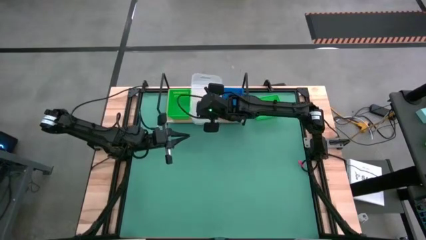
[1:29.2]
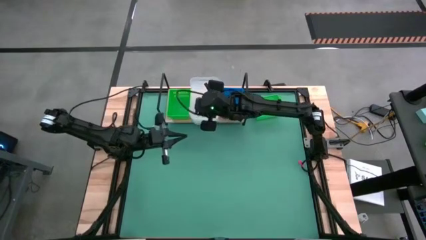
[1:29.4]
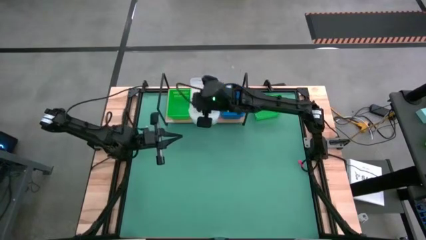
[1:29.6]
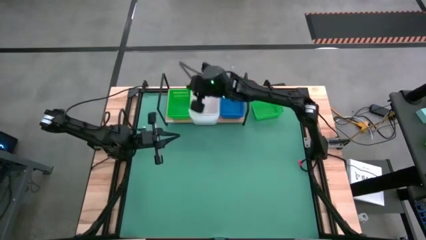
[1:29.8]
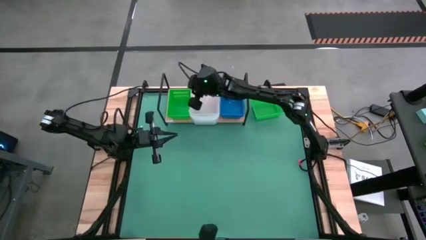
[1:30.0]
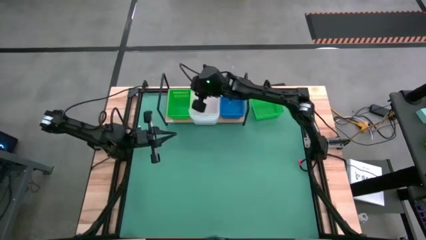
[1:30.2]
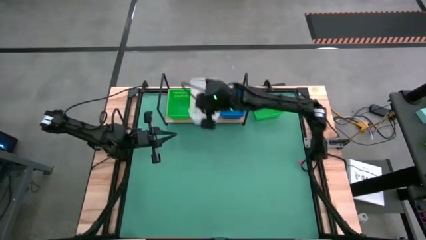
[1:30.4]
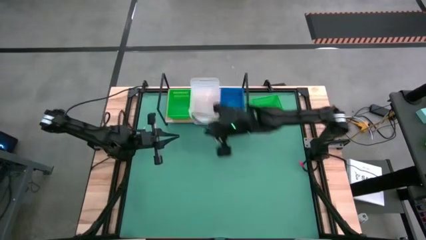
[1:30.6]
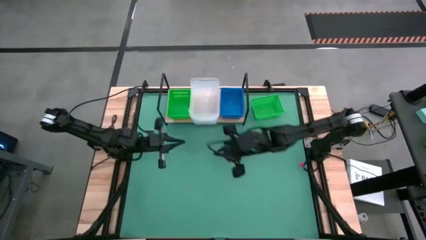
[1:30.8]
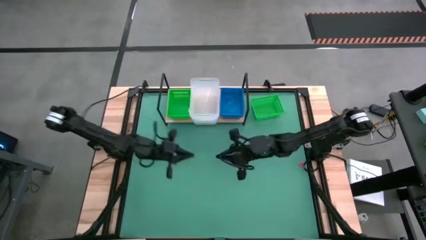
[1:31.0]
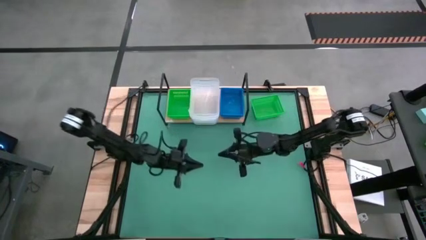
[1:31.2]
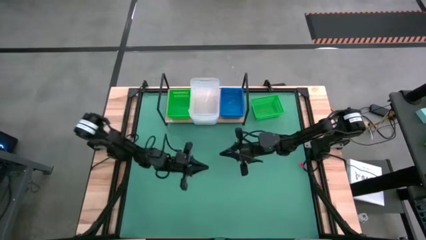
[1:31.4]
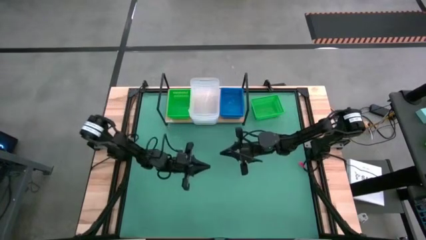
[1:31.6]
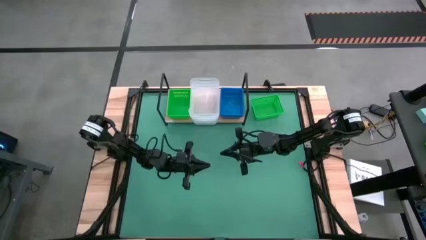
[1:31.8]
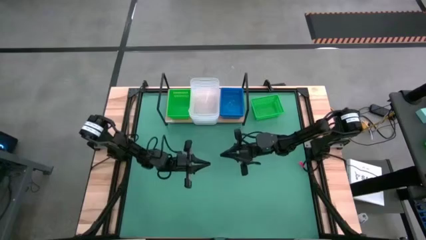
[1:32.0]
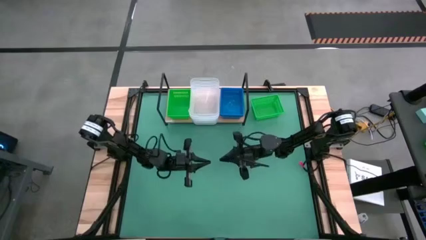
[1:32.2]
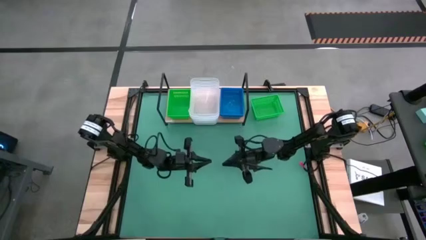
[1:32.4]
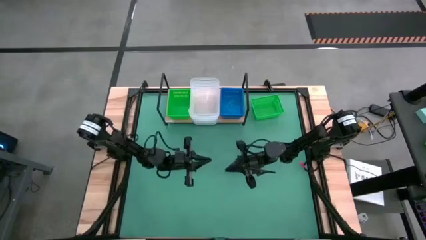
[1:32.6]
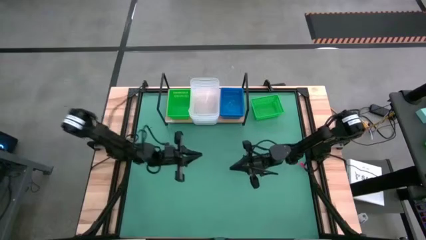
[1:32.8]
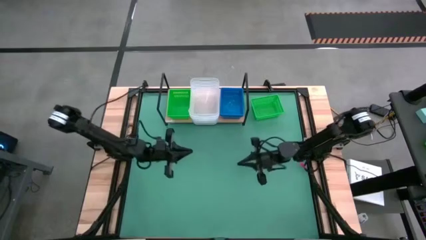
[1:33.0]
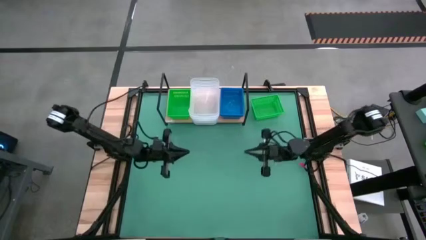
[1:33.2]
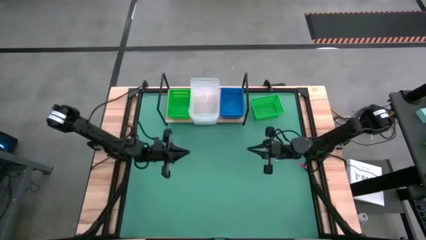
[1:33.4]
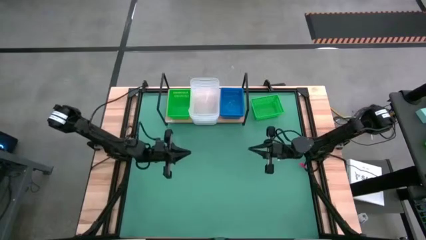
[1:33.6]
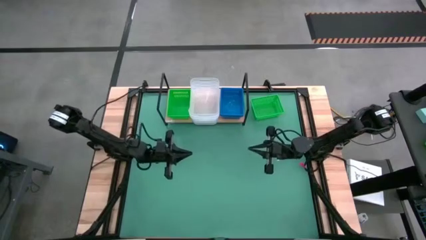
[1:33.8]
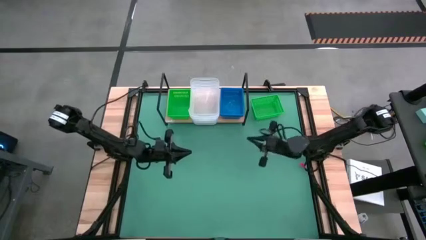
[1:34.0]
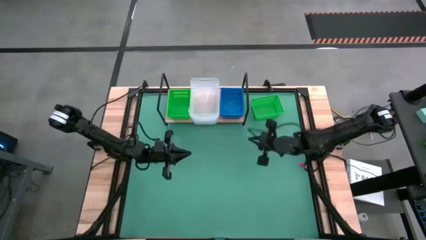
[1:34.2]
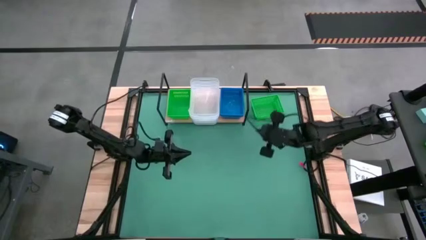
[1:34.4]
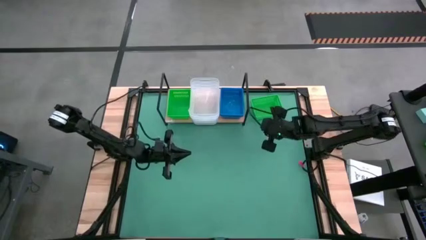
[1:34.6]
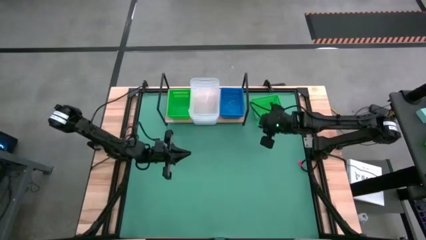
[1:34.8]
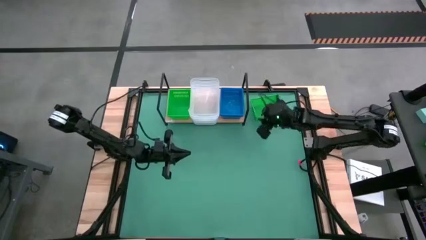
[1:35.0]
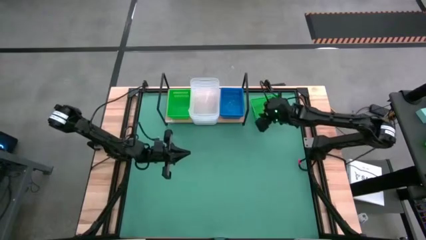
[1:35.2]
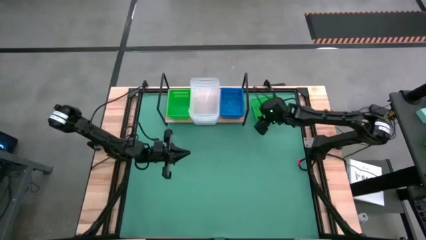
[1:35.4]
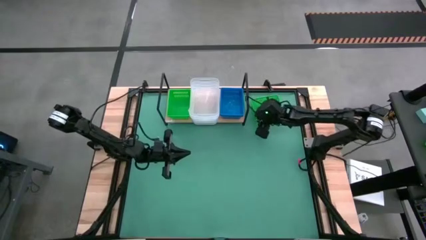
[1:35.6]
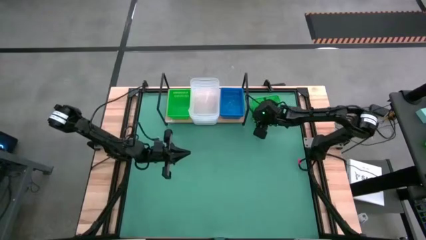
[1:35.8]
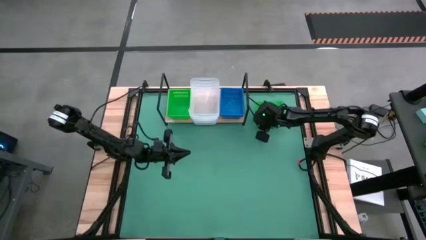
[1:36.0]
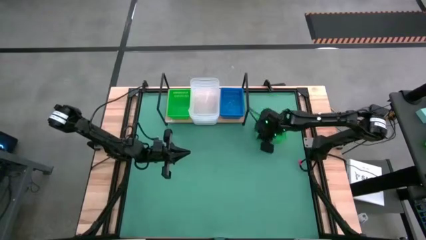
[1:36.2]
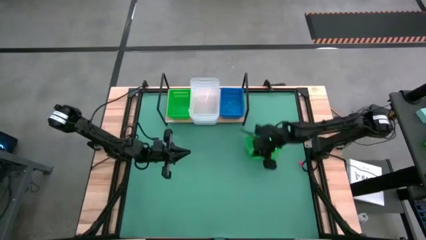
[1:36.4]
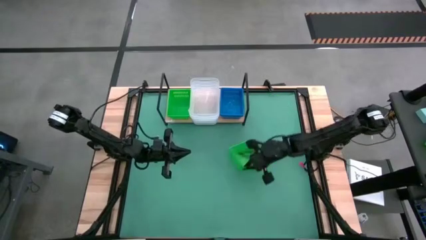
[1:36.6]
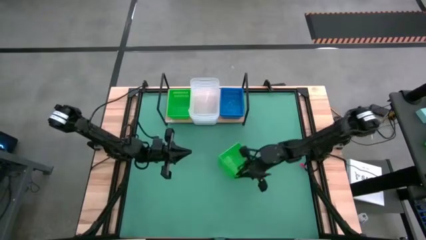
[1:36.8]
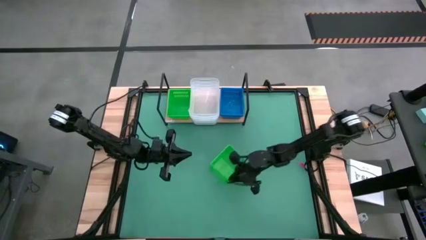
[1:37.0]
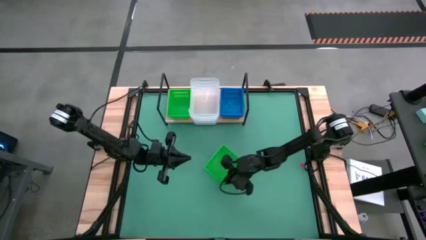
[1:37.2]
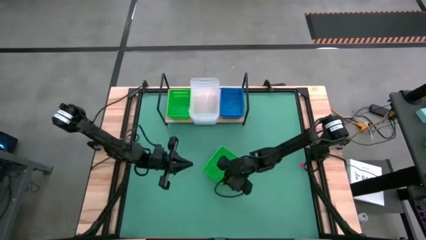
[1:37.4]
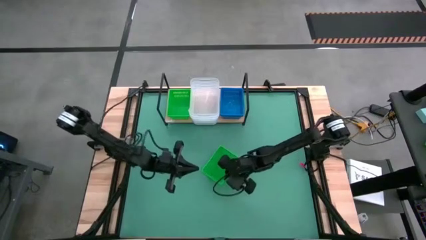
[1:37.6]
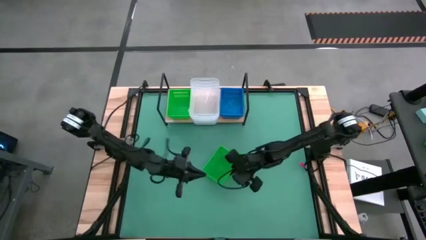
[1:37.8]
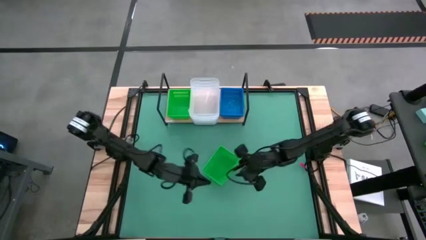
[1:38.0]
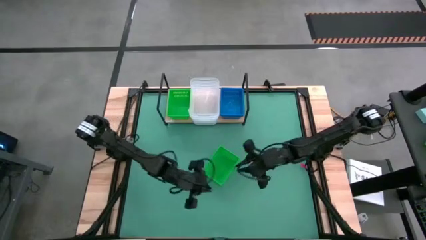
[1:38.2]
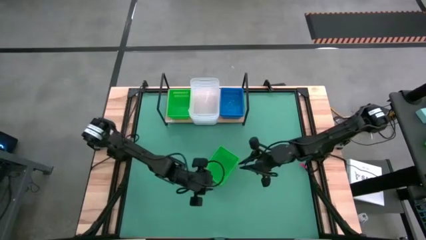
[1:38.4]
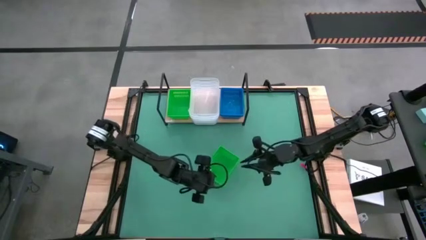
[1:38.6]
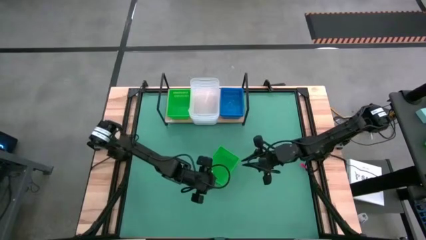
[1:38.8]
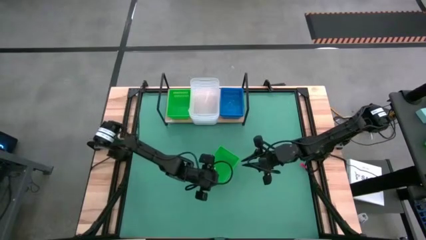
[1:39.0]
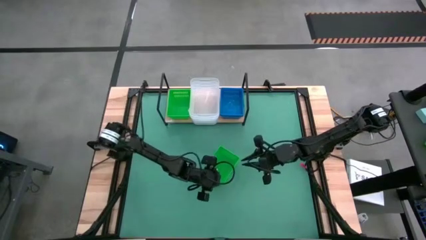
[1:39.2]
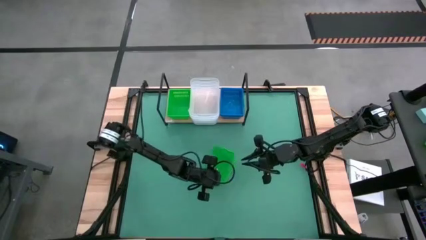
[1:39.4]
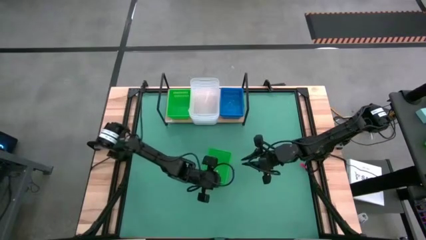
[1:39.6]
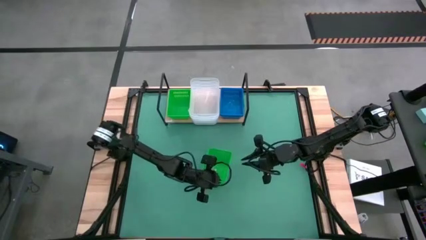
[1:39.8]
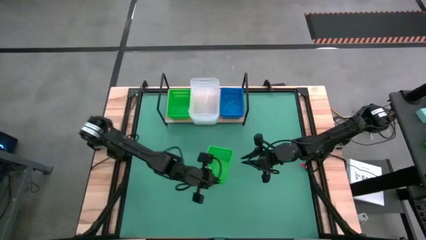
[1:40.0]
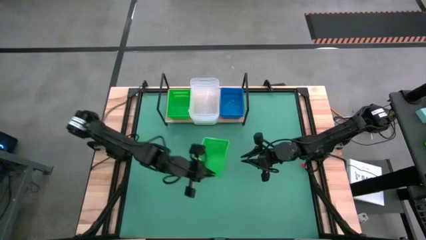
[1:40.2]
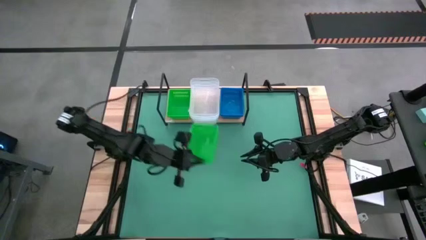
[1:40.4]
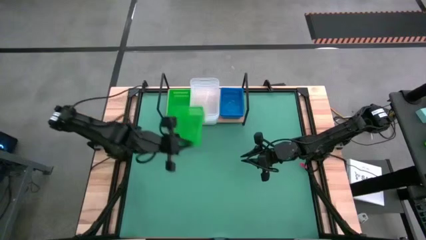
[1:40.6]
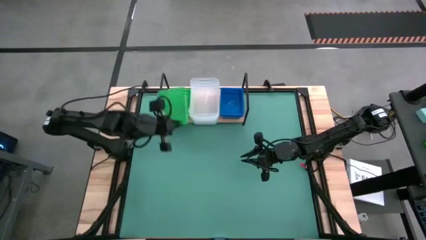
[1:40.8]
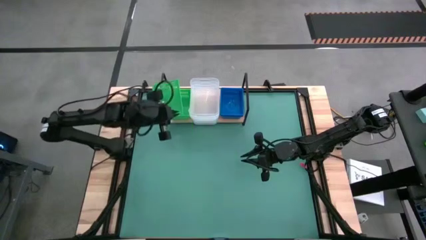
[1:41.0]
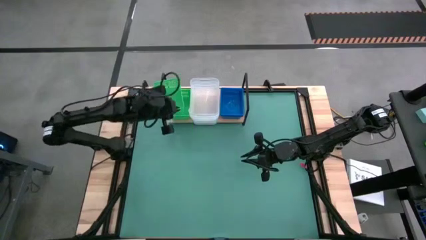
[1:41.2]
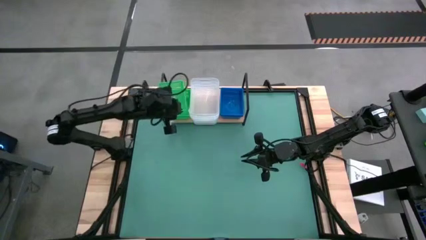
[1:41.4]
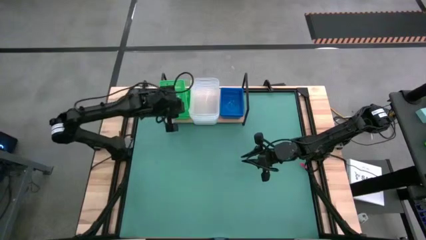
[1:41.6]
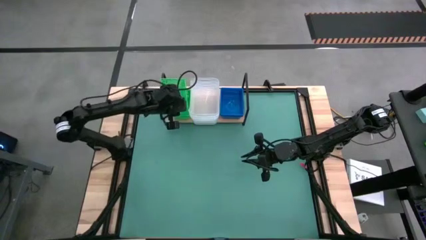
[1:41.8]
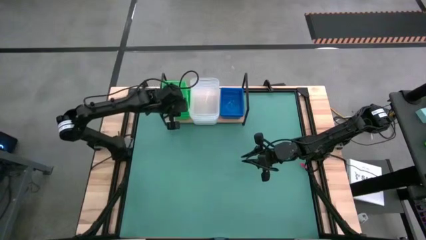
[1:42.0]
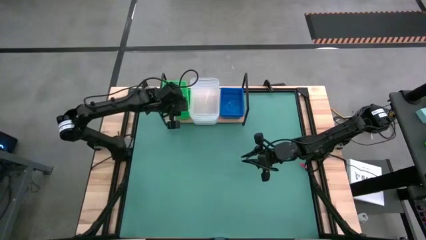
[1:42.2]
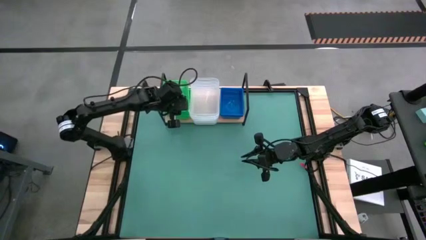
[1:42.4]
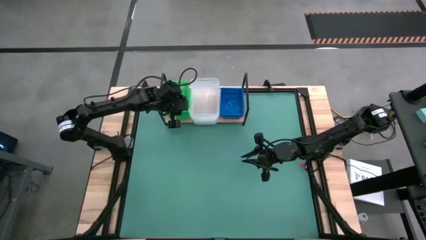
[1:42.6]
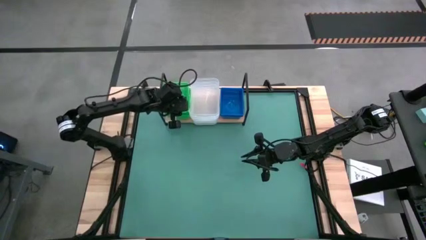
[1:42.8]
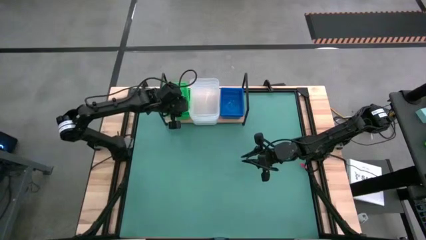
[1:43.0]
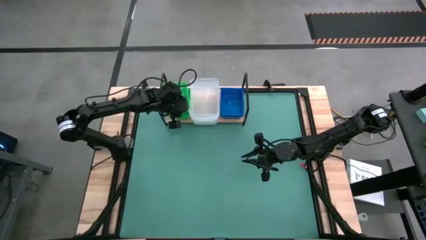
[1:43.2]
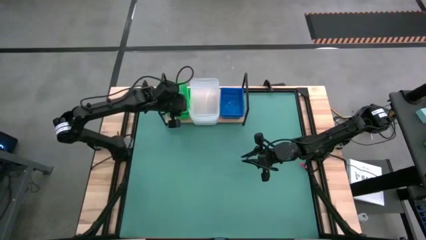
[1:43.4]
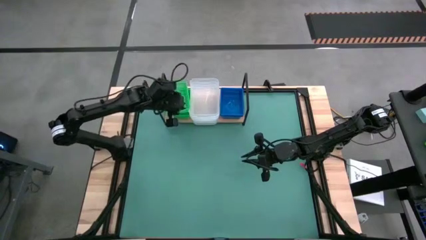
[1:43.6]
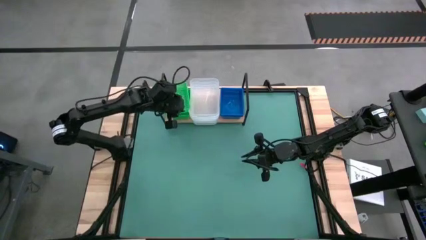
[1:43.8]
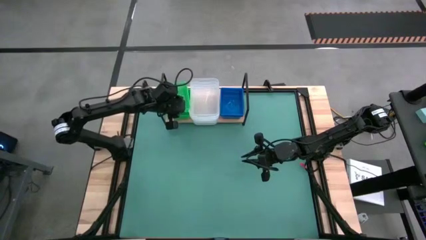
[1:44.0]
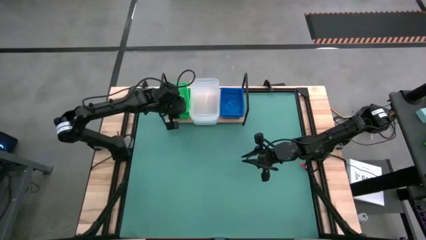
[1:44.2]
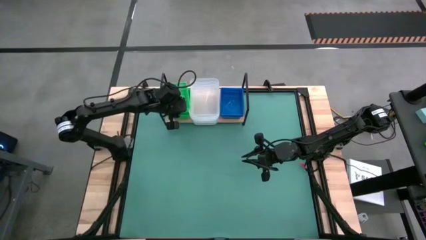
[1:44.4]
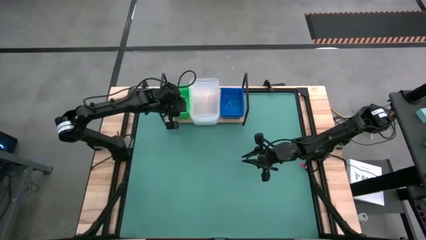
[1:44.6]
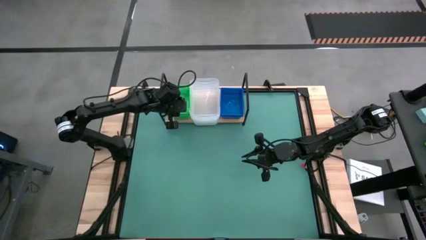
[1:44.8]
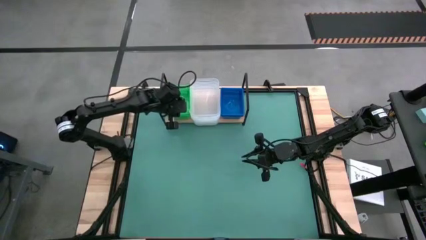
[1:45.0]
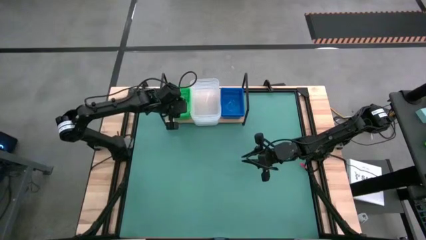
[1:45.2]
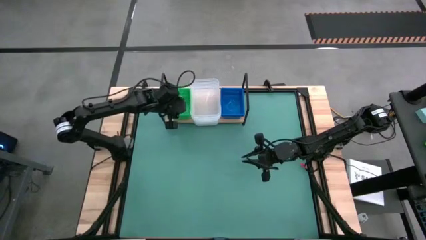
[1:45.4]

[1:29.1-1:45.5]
Task: Stack baskets on shelf by color
Stack the green bin on the other green bin on the shelf

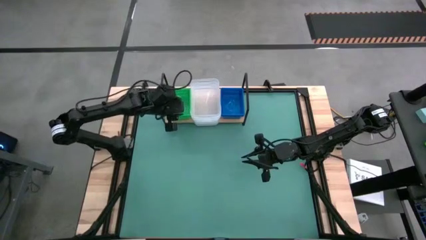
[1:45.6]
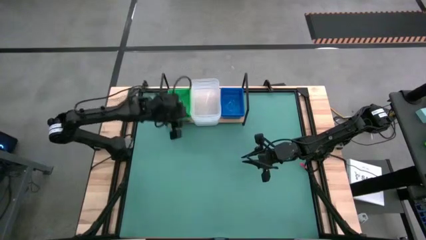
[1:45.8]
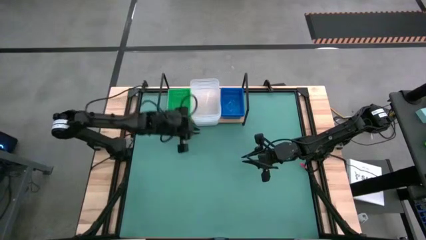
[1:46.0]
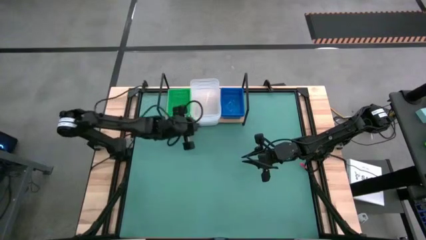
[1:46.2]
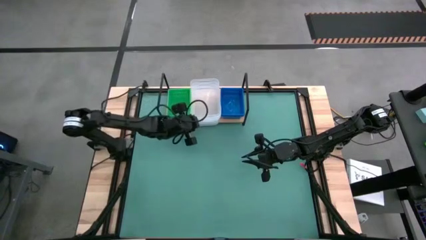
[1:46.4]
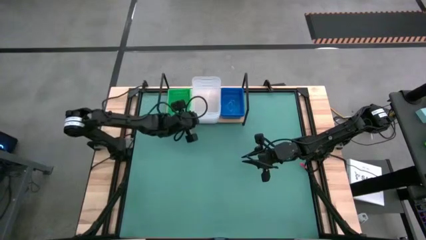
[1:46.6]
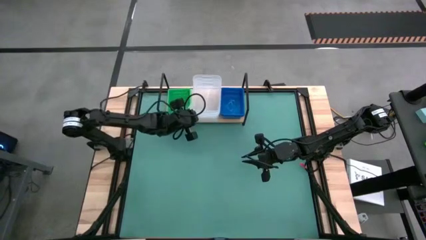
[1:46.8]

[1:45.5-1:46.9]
Adjust the transparent bin
